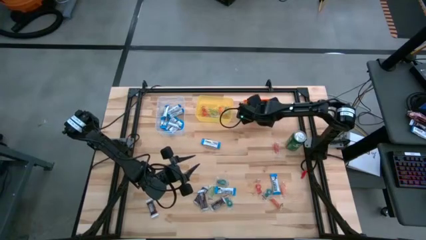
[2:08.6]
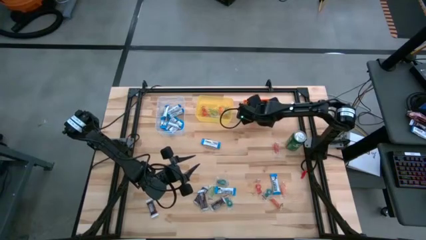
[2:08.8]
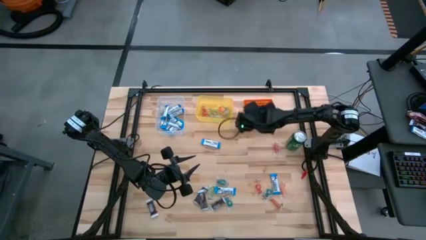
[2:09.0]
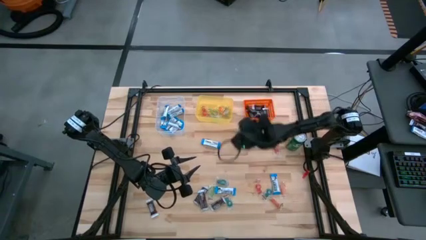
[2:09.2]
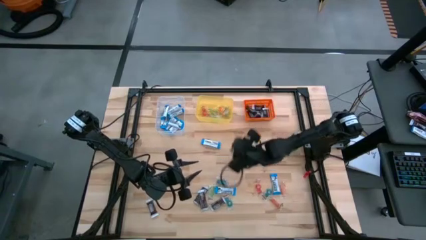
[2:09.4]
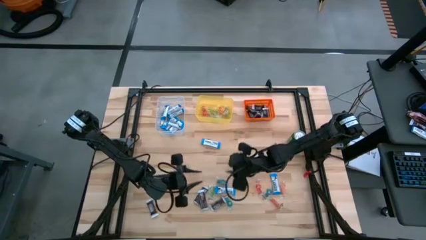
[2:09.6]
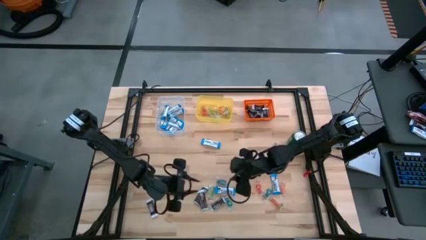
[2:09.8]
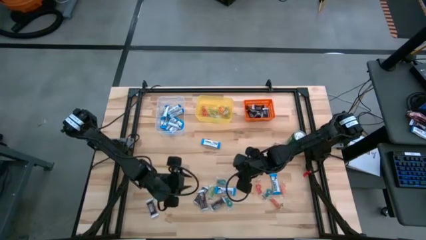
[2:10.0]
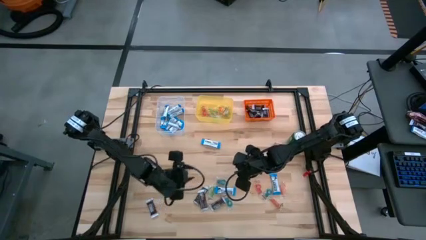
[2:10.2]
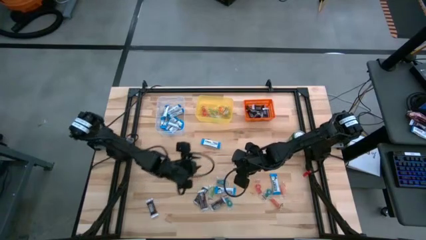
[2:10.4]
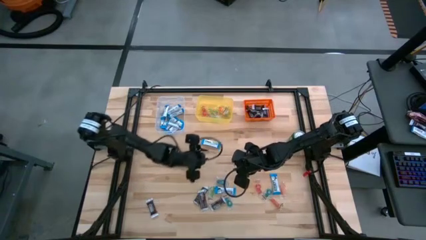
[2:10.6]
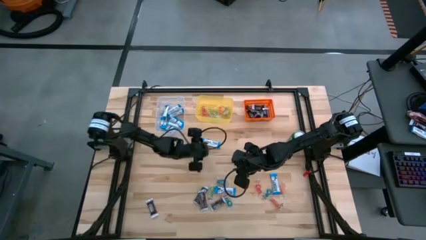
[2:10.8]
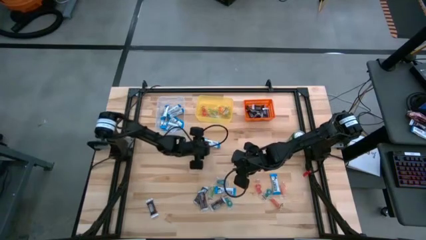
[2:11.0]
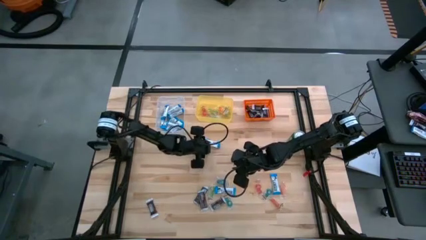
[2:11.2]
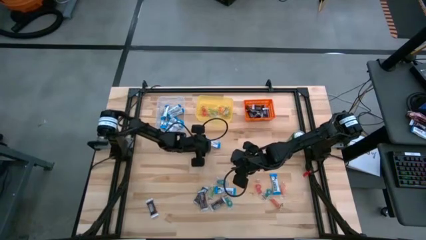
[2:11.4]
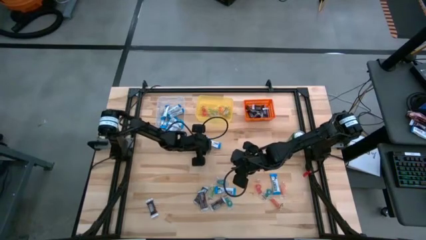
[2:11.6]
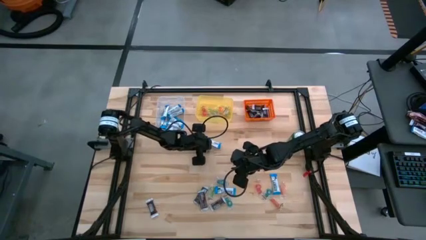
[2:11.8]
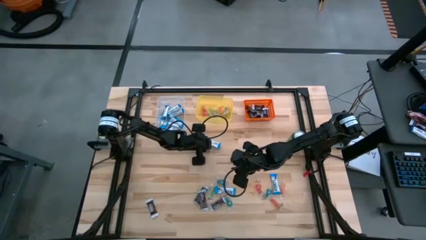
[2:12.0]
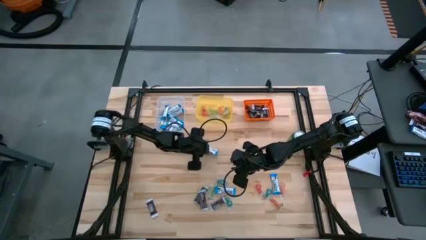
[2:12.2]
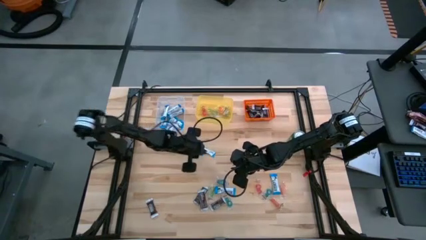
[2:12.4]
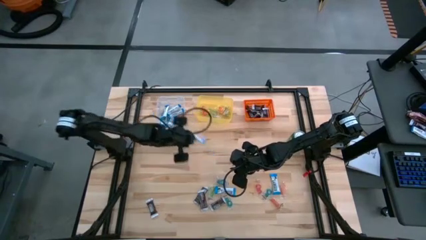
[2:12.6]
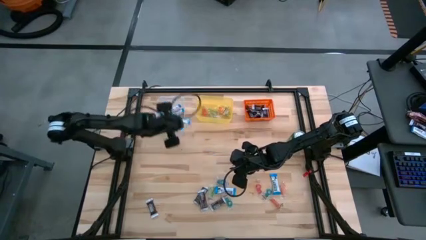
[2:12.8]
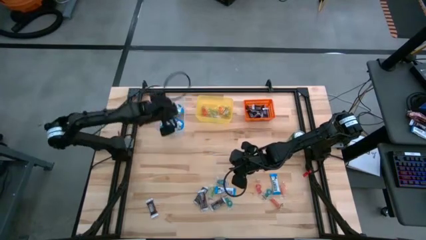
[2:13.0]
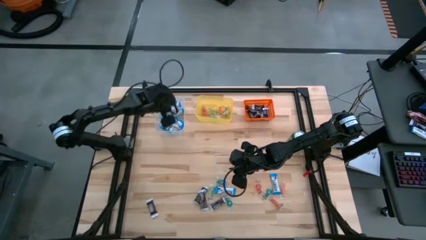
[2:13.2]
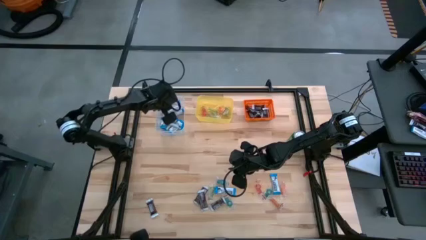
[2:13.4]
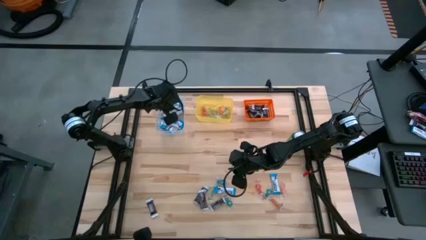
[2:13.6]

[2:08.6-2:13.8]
Task: Sort candy
Put the white chocolate into the transparent bin

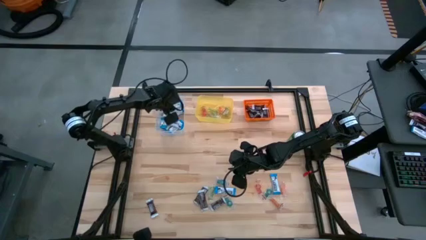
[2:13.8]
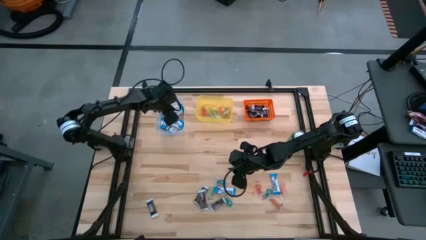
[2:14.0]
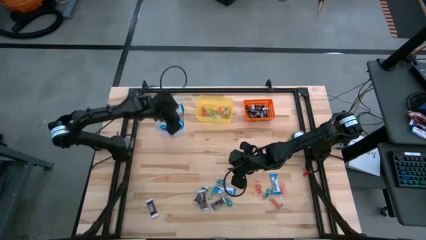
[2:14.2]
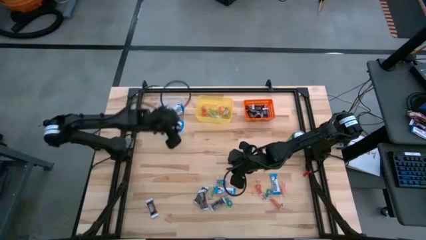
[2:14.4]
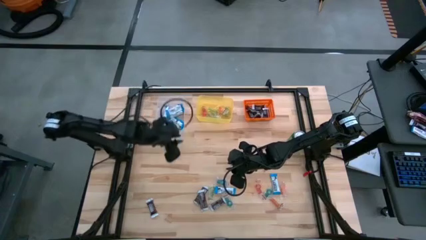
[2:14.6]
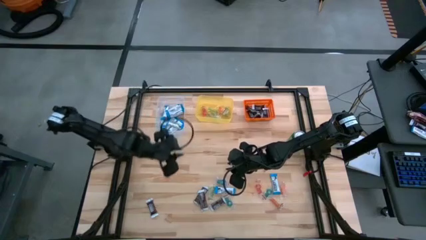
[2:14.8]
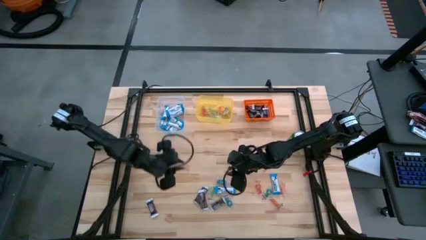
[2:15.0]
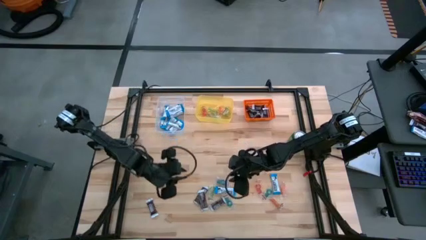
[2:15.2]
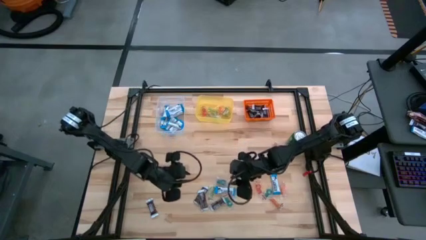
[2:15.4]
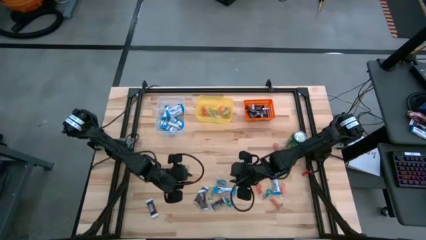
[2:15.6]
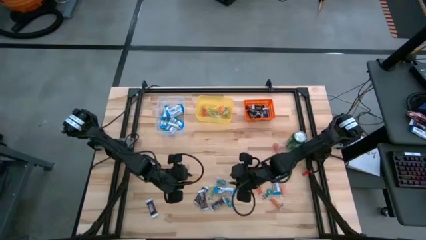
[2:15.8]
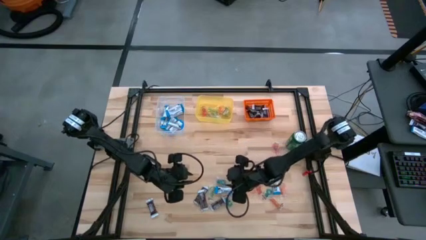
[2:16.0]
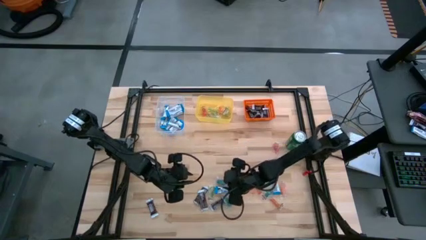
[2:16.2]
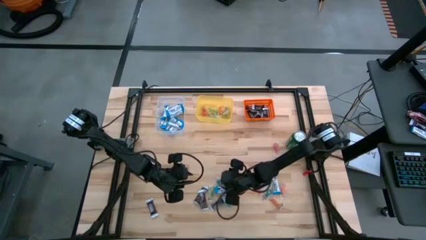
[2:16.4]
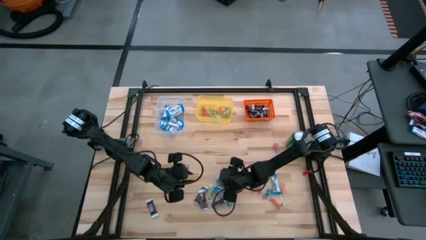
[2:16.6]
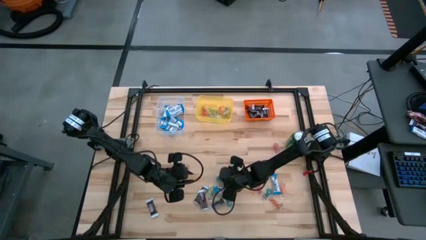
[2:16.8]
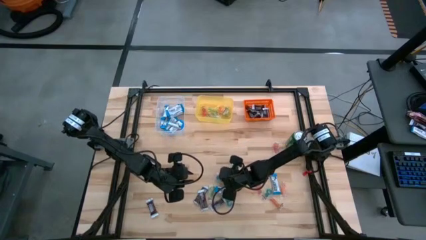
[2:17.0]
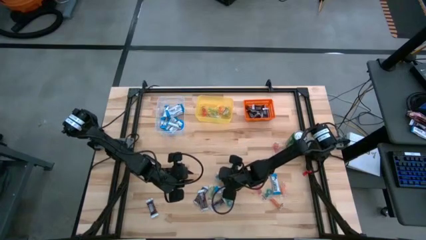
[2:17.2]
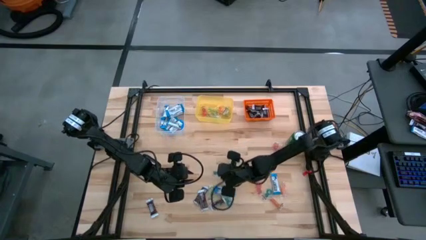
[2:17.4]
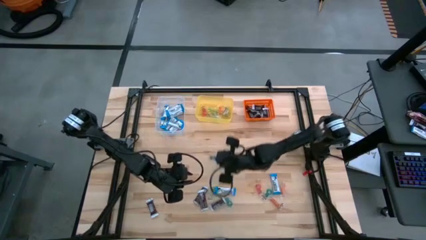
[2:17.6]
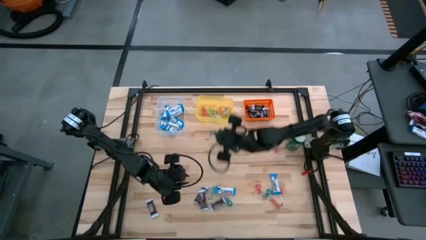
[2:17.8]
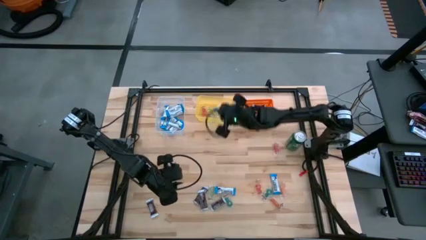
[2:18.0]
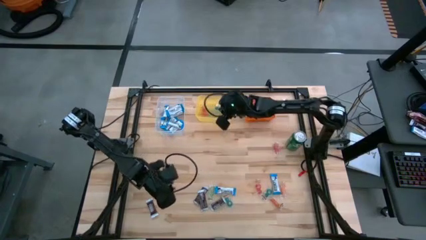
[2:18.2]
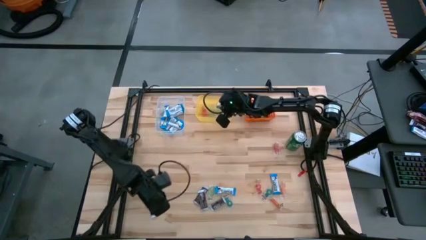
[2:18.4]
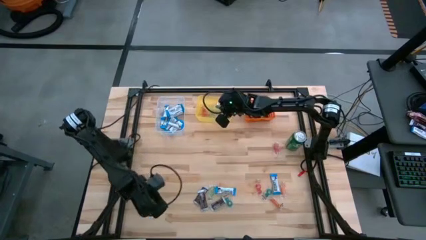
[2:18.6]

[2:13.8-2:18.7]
Put the blue gummy into the yellow bin

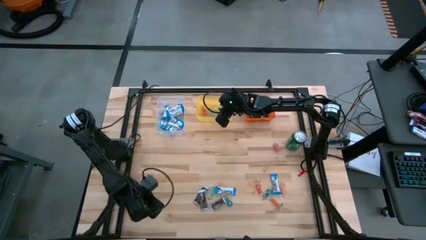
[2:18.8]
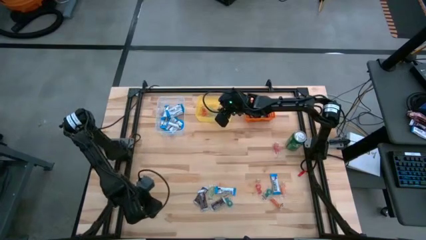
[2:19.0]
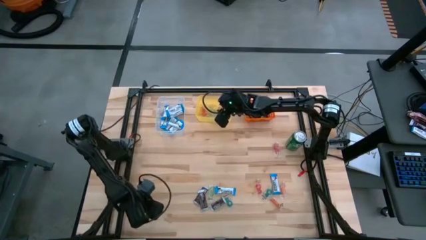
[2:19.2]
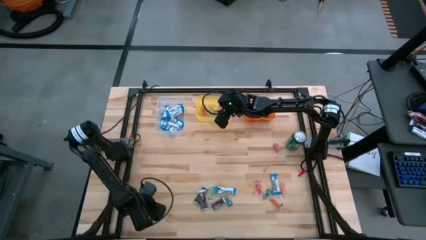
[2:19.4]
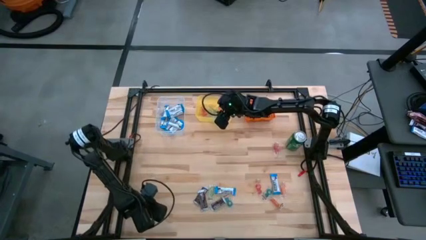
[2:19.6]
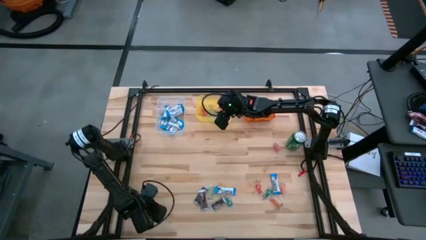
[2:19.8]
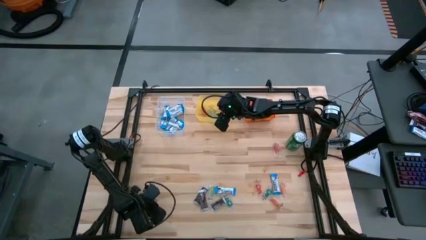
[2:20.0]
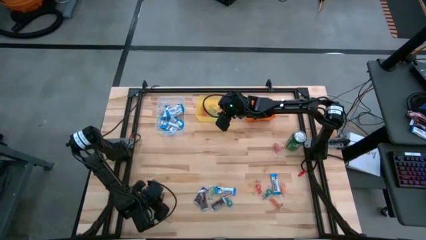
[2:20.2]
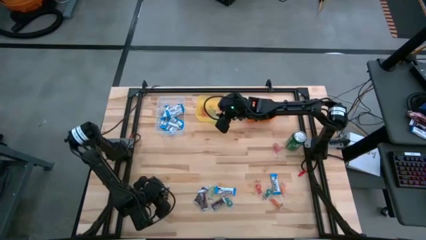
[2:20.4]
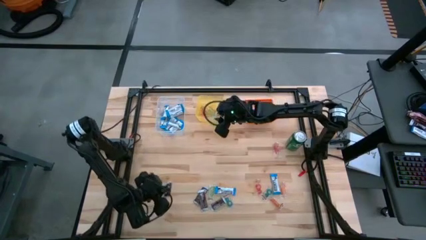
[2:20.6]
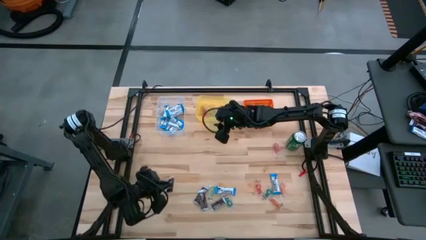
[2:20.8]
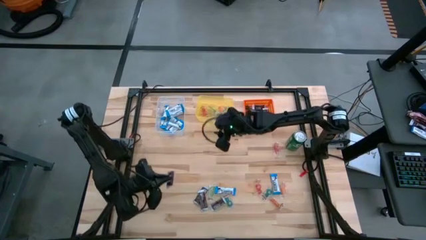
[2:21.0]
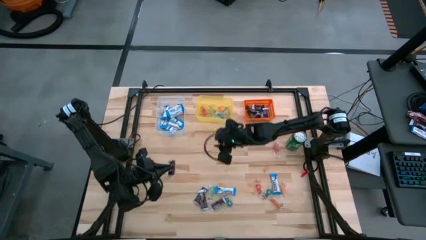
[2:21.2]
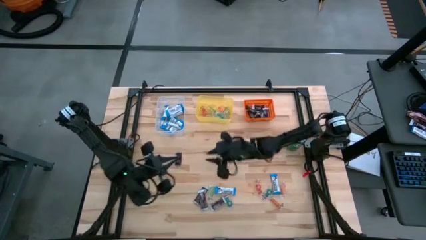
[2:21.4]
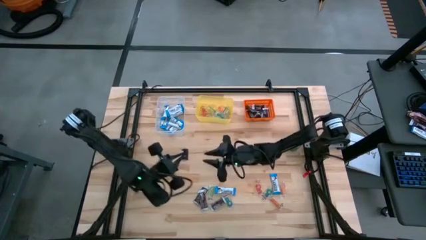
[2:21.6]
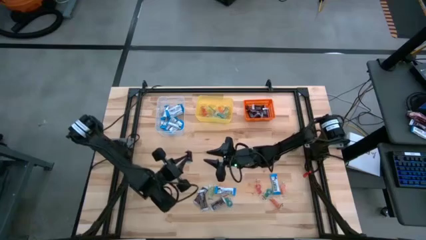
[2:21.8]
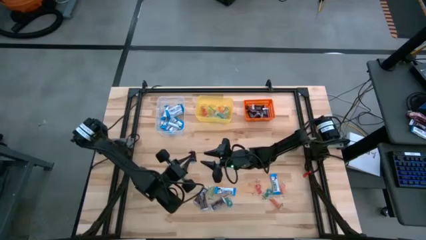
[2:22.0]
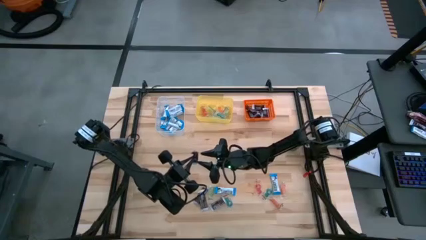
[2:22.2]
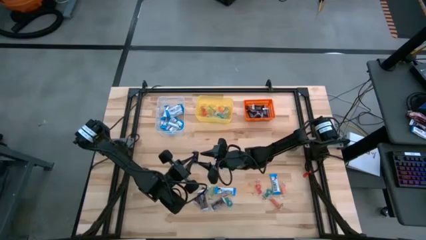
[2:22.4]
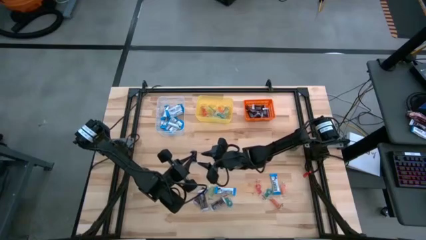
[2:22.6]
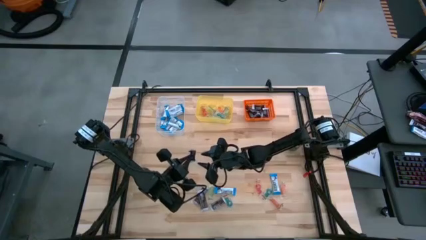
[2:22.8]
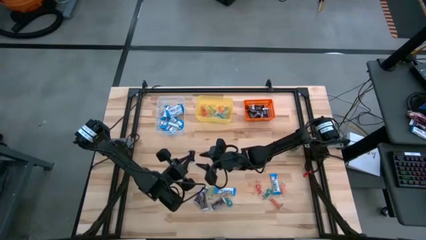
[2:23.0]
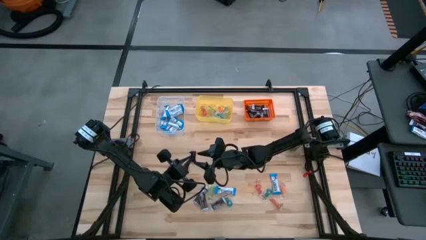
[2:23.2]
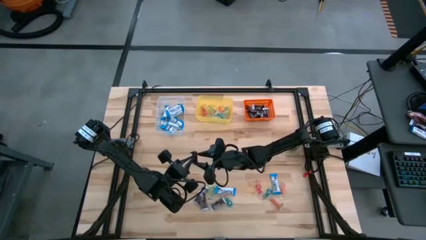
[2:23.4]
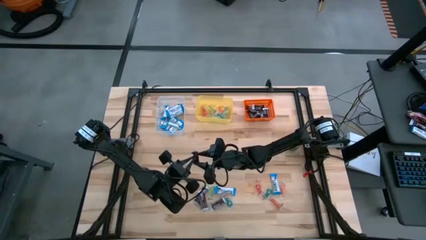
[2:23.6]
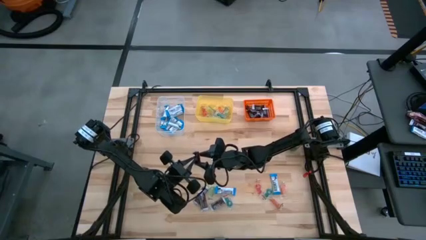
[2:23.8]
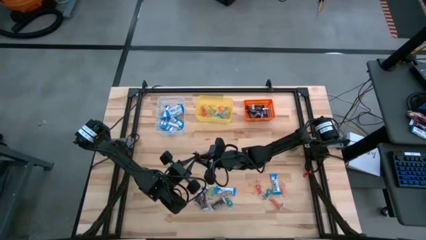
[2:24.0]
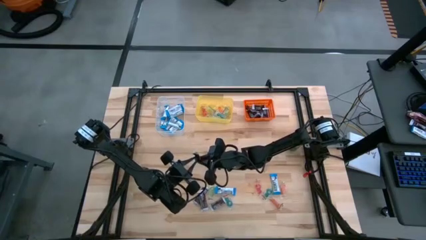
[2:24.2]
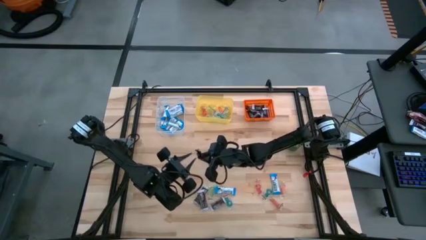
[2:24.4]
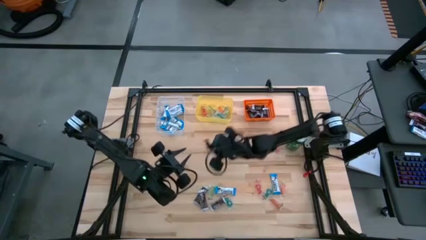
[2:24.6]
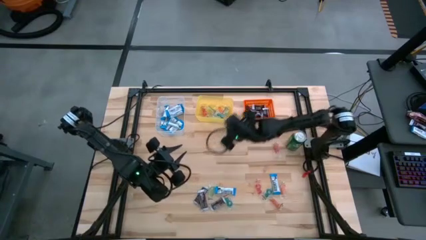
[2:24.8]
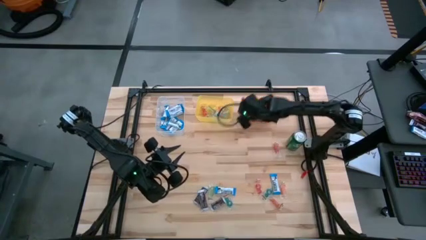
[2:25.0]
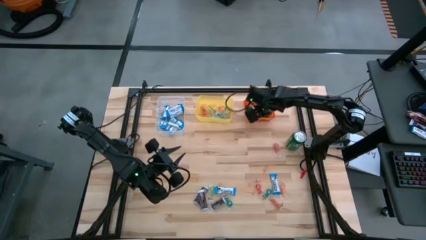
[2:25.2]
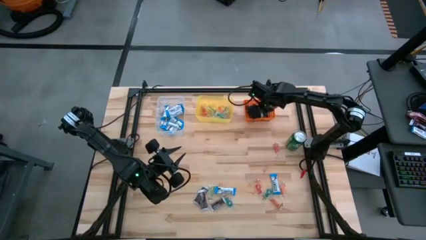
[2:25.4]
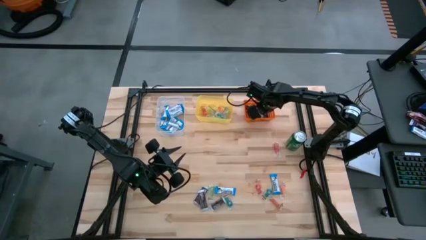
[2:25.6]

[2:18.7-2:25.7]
Put the left black chocolate into the orange bin
